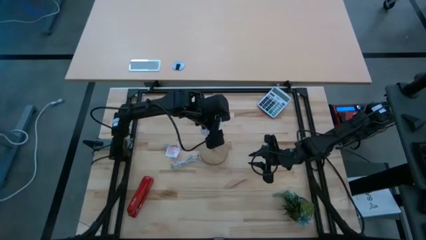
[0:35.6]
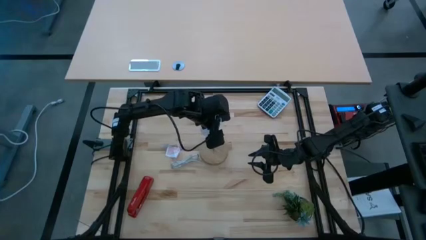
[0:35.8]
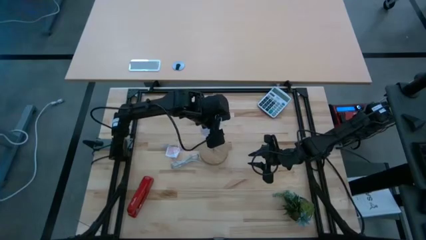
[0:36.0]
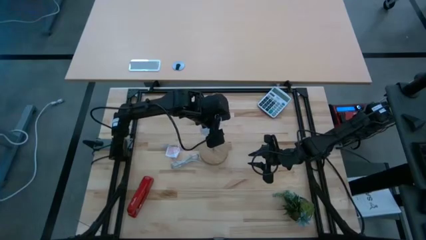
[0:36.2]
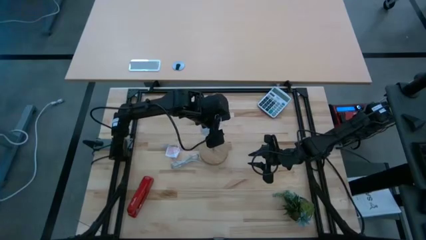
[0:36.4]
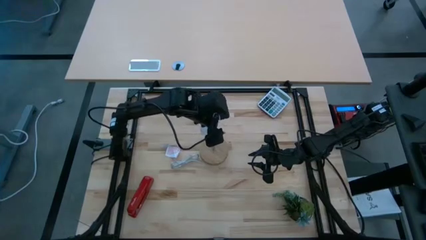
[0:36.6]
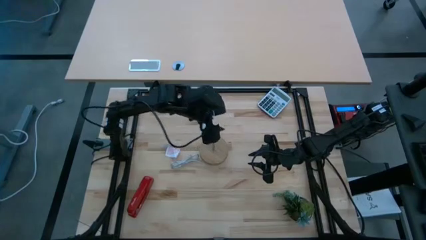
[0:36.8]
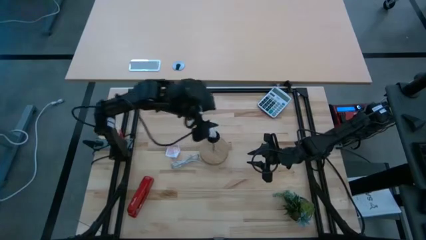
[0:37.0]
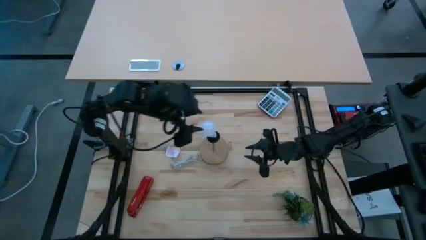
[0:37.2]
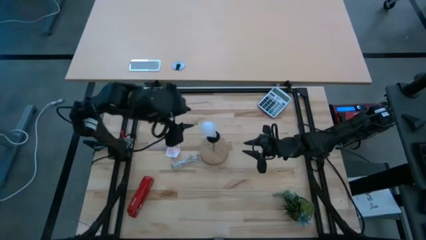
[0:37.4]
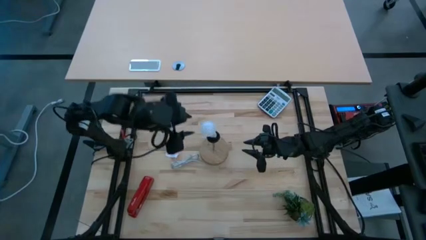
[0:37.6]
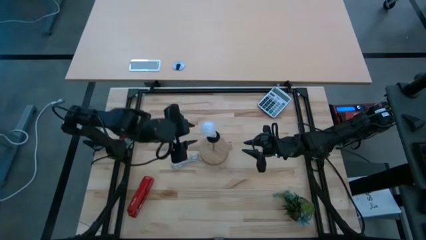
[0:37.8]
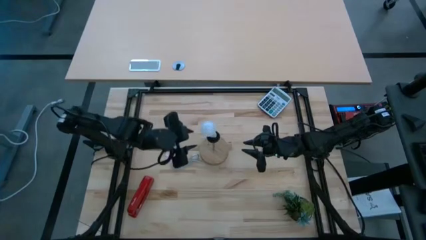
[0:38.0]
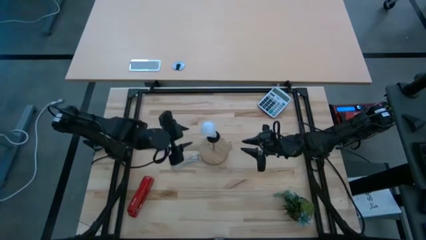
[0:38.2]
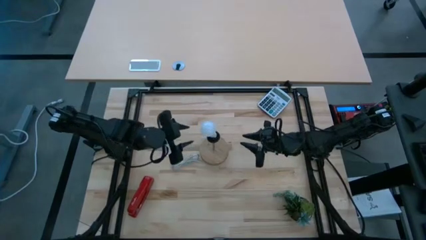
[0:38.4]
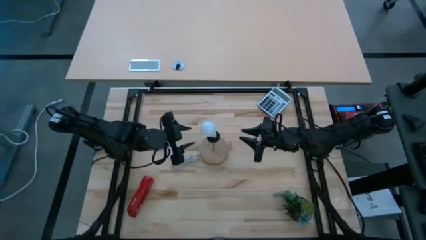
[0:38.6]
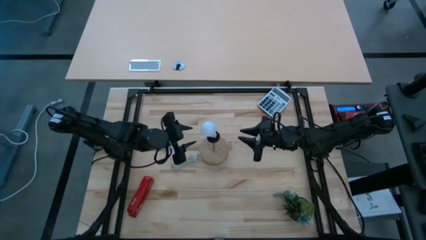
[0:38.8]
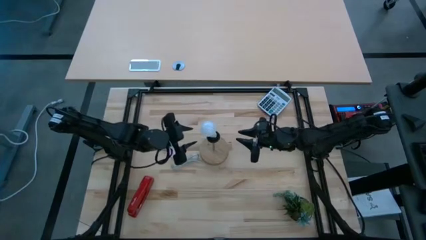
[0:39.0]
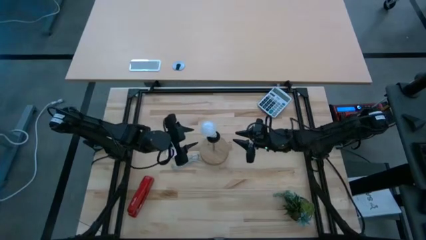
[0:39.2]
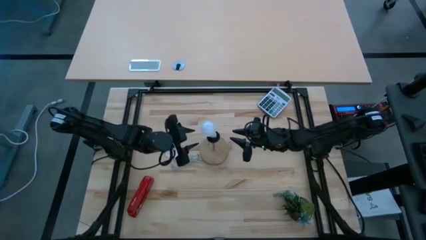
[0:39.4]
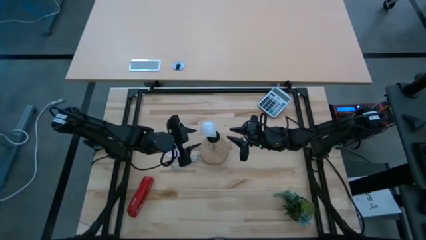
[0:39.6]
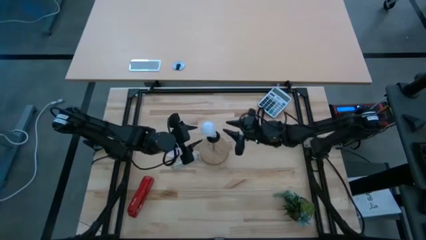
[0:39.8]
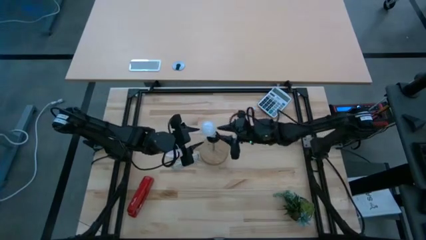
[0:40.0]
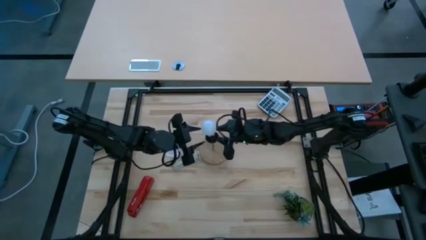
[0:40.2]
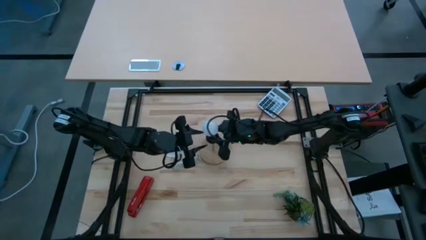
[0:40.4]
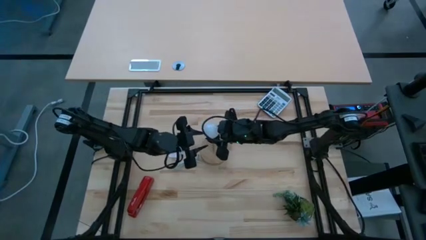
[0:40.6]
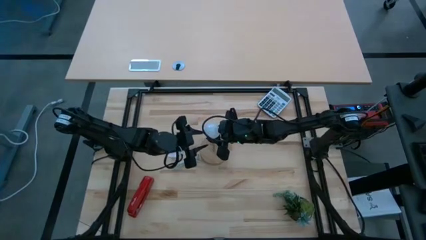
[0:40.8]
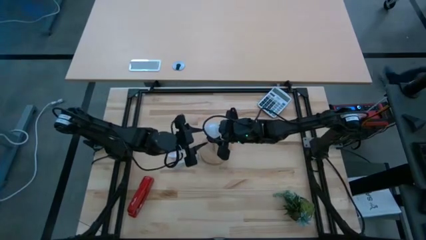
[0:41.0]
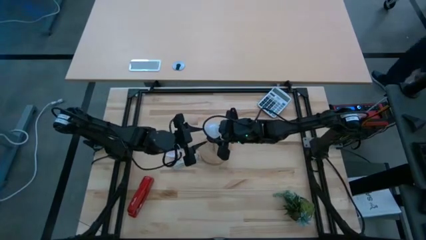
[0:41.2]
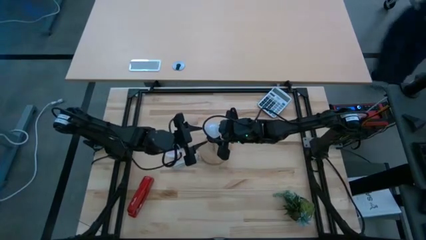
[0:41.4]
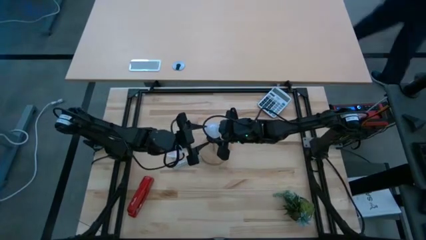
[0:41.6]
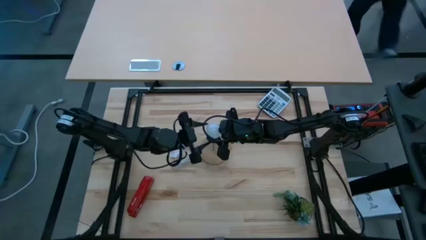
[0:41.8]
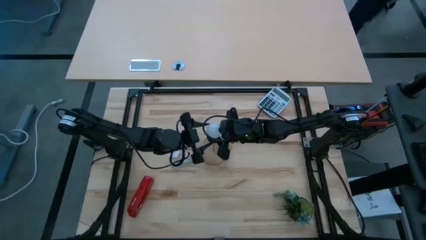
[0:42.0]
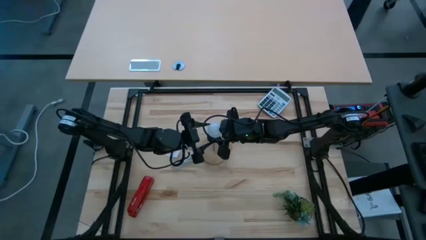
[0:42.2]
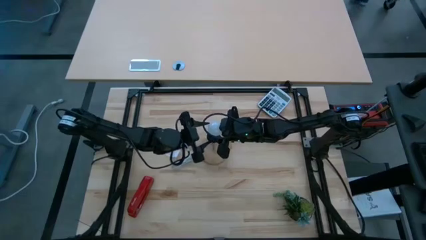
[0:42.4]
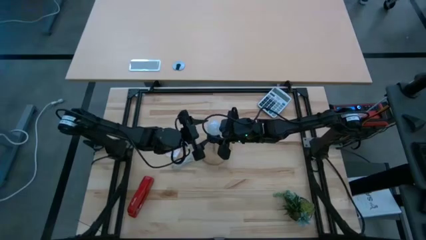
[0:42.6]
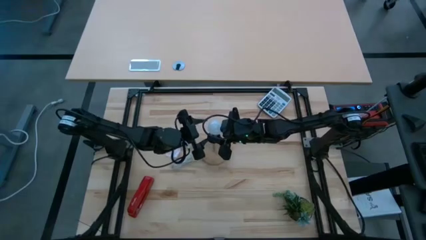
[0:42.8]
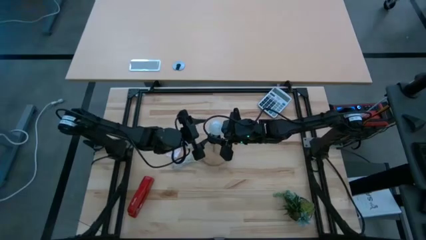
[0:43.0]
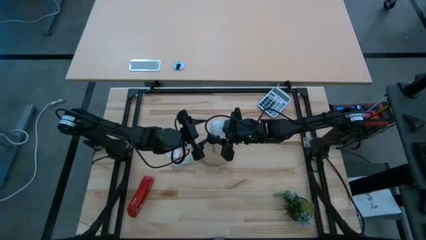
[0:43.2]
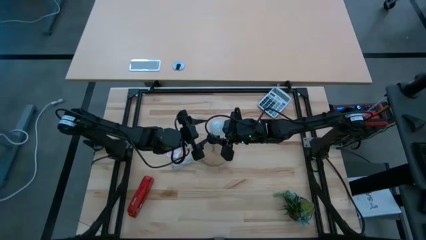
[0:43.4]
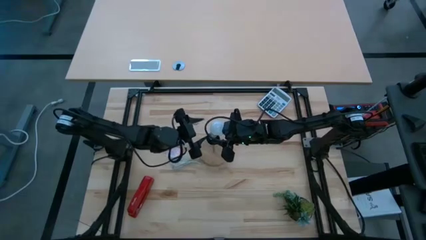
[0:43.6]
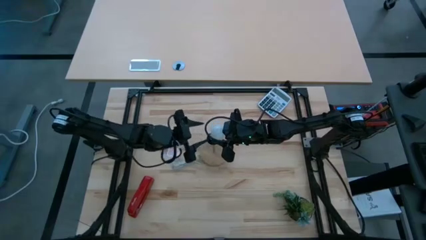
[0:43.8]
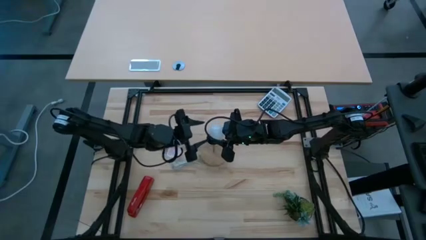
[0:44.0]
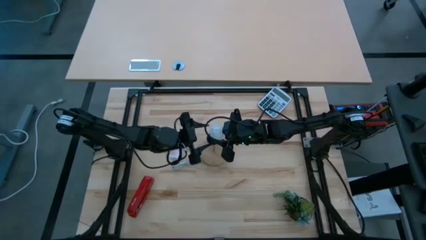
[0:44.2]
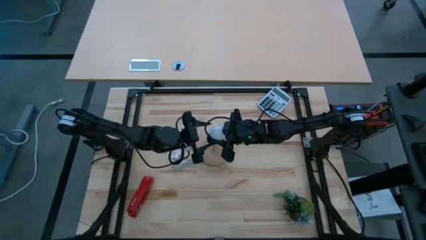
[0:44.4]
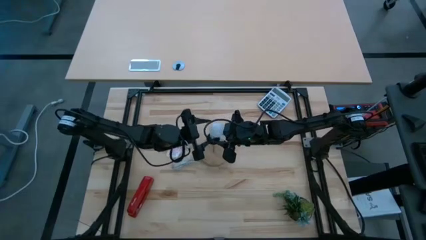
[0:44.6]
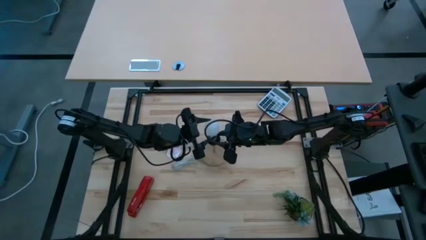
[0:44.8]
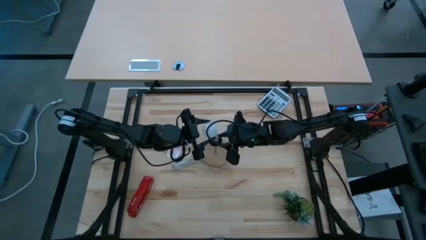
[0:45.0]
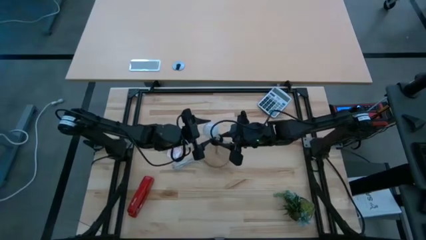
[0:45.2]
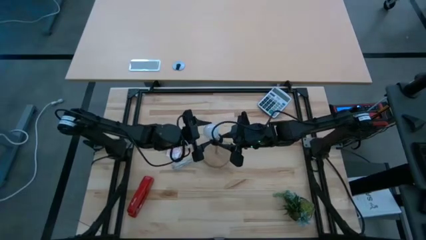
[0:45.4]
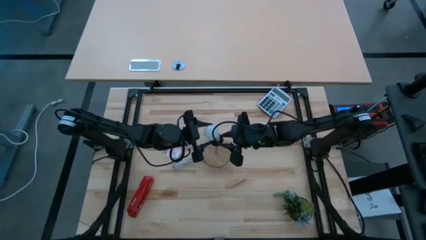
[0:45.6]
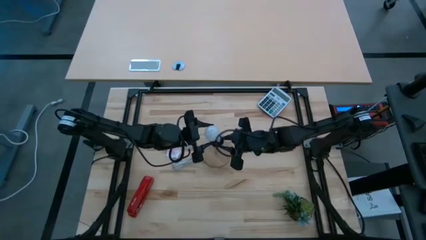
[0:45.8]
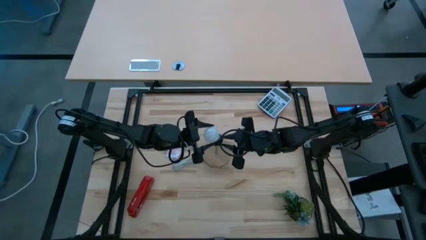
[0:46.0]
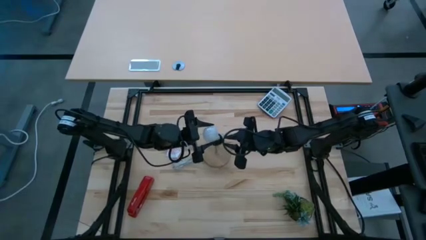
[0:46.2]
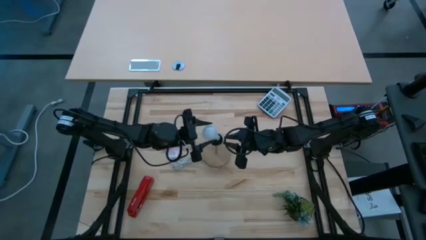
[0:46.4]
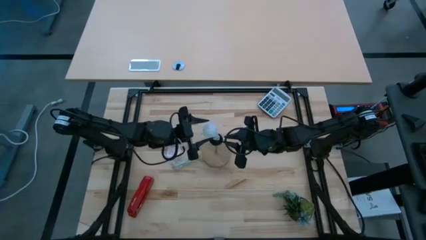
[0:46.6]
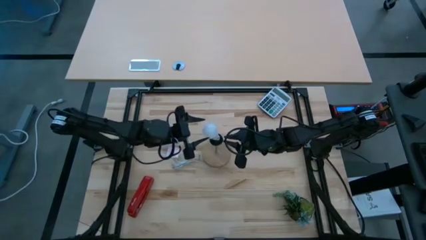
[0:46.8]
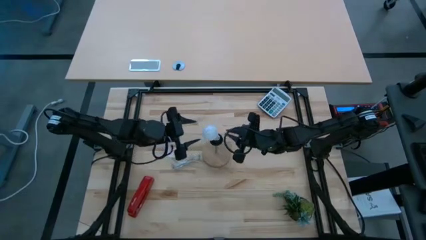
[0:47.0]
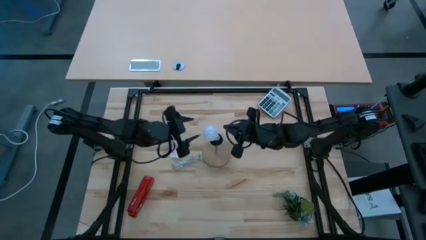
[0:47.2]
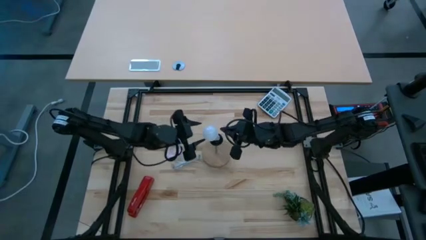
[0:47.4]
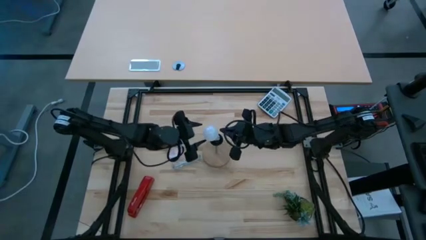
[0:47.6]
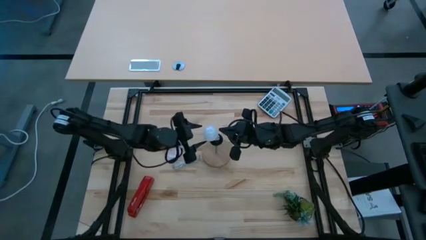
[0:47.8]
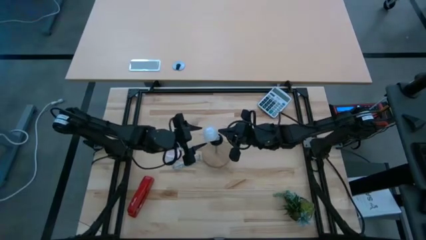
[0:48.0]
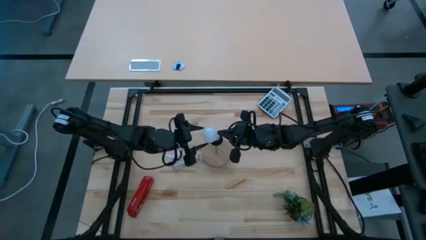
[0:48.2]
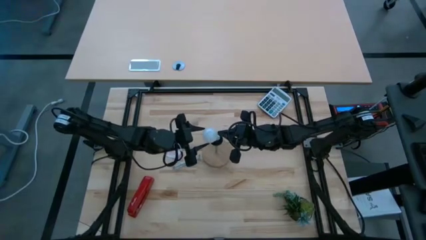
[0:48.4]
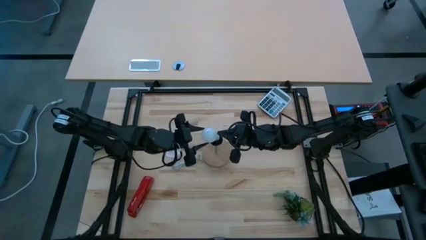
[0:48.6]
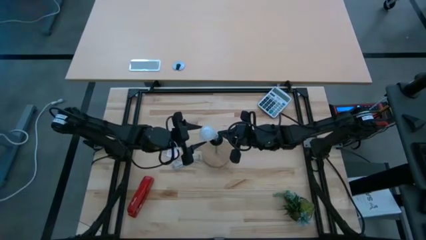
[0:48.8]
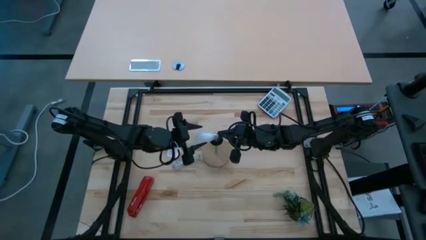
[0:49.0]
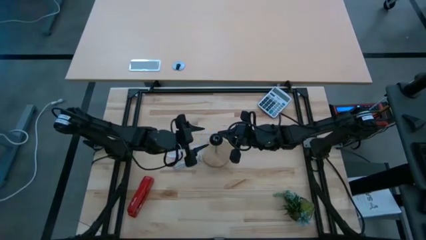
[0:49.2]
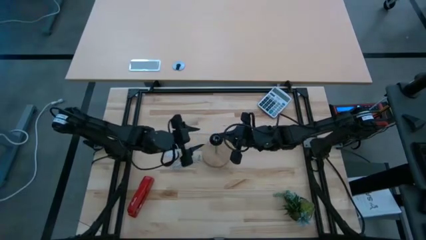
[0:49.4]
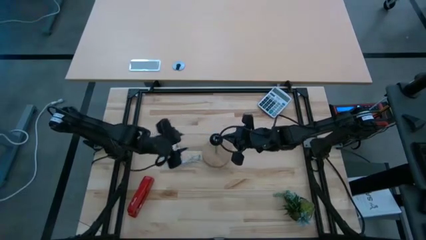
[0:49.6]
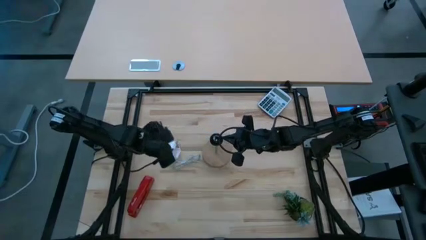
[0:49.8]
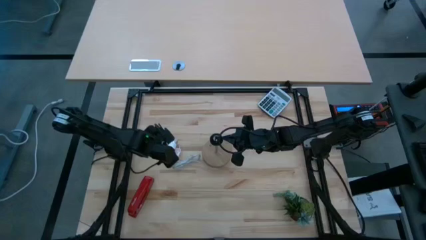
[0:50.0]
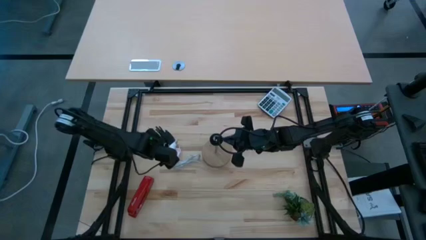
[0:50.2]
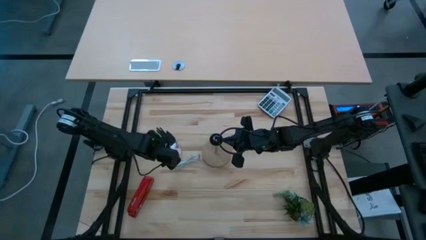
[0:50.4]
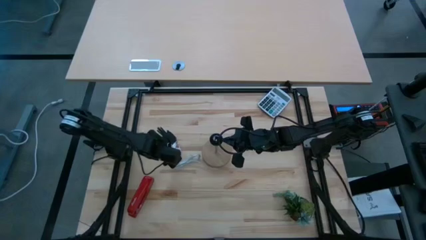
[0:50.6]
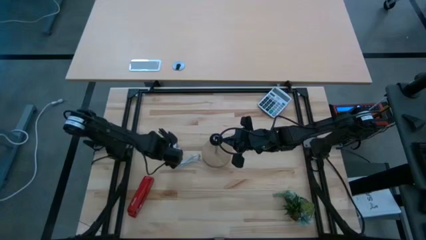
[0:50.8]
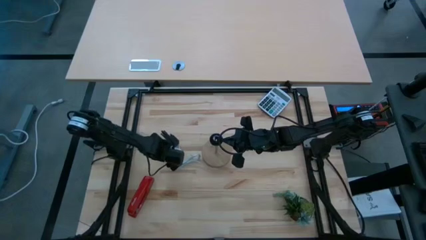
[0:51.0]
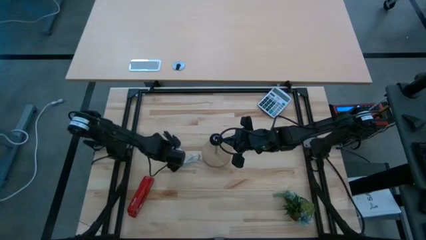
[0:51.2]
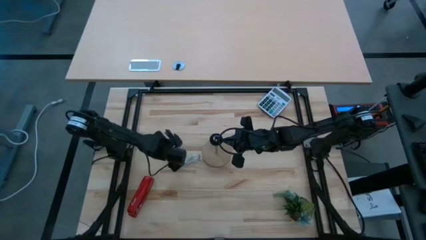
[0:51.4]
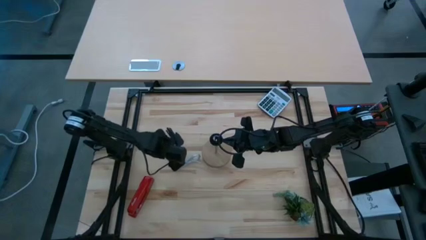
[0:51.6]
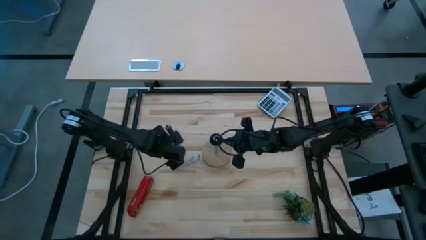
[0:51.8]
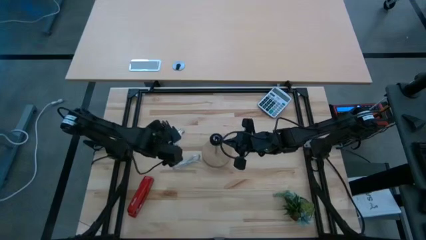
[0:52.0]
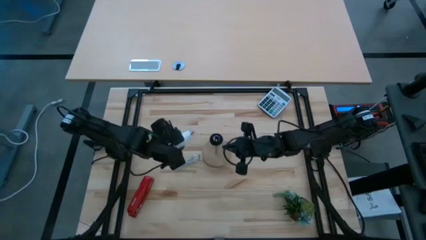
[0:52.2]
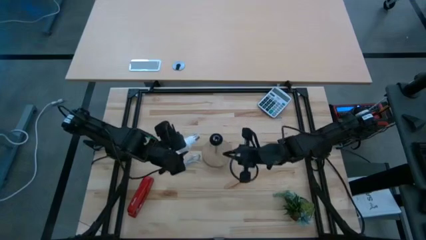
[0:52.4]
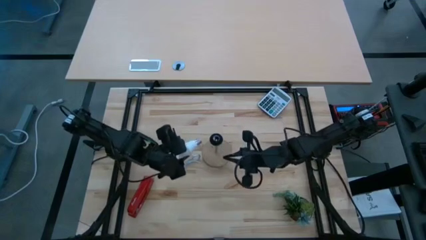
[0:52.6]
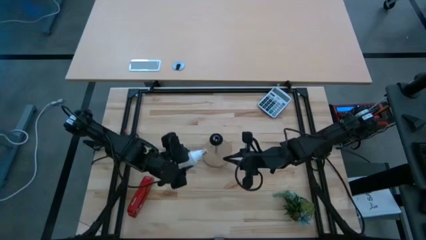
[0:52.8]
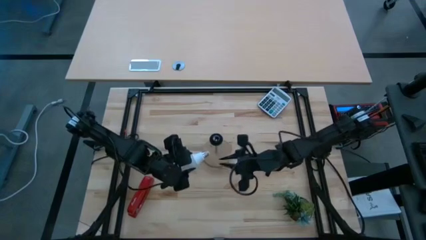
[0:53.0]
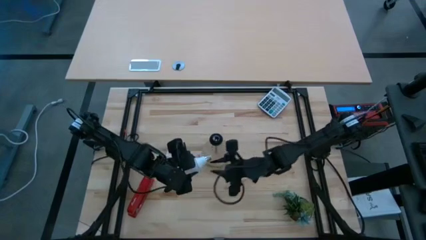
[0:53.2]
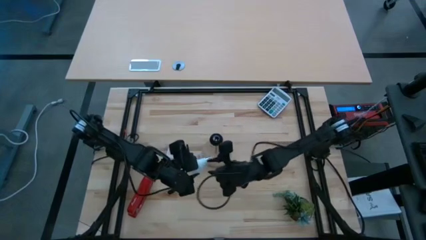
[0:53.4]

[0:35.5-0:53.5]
Task: Screw lightbulb
Insert the lightbulb into the brown lamp
